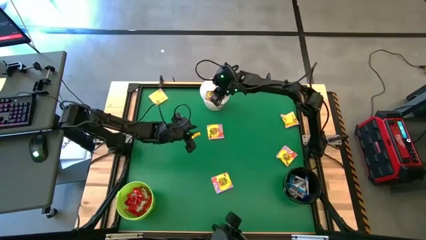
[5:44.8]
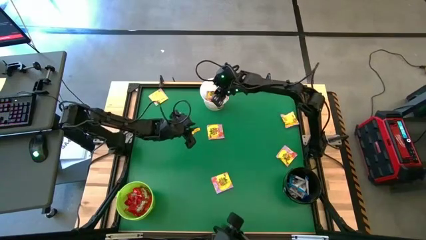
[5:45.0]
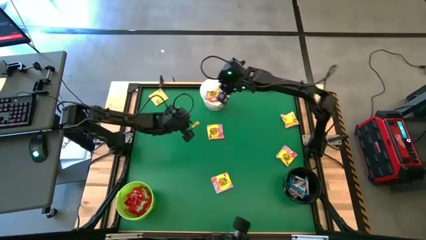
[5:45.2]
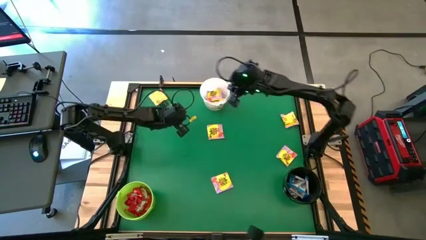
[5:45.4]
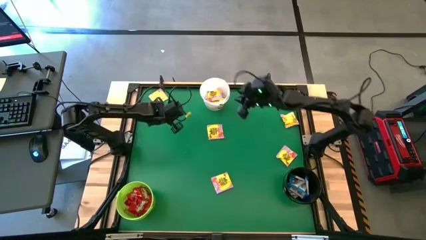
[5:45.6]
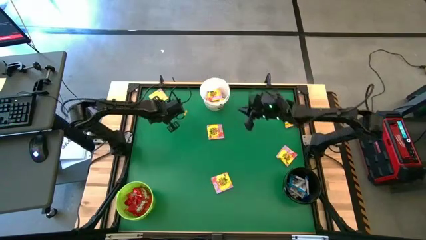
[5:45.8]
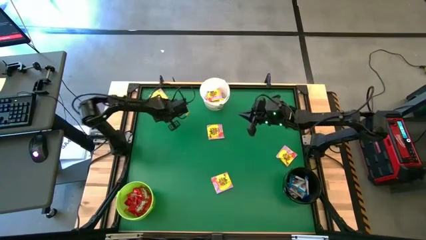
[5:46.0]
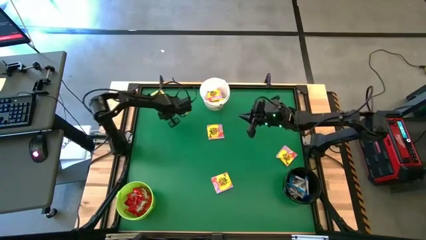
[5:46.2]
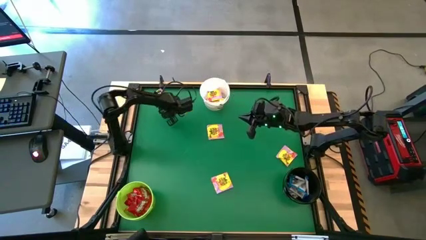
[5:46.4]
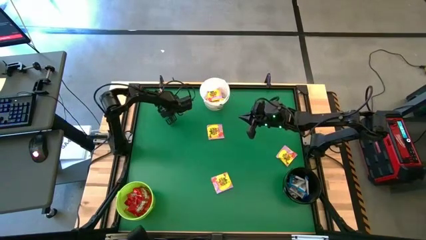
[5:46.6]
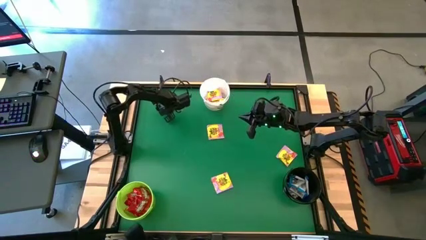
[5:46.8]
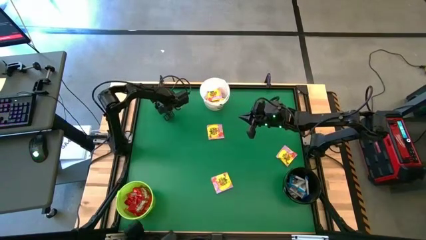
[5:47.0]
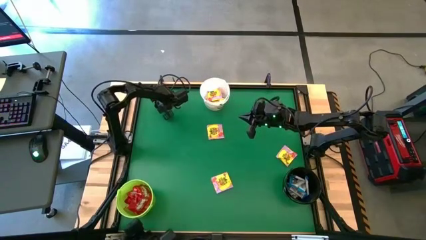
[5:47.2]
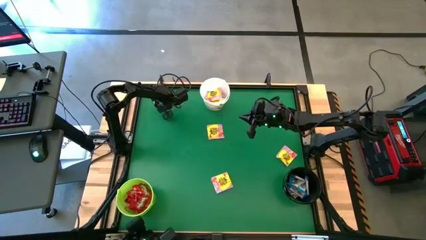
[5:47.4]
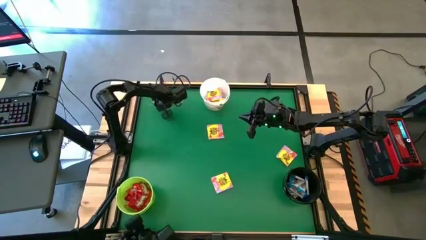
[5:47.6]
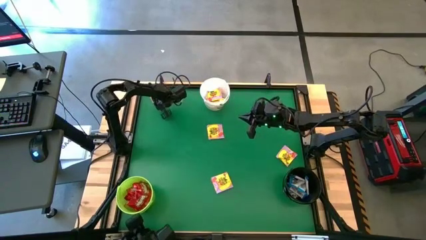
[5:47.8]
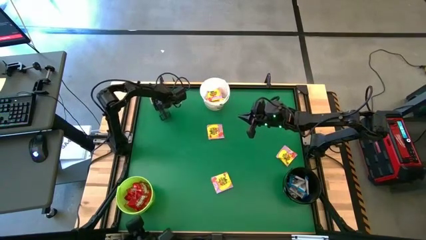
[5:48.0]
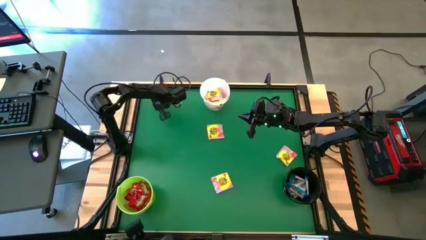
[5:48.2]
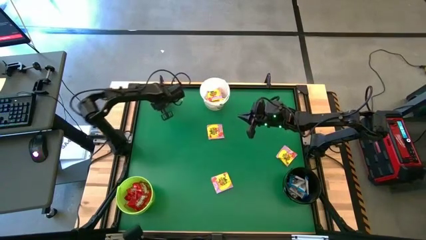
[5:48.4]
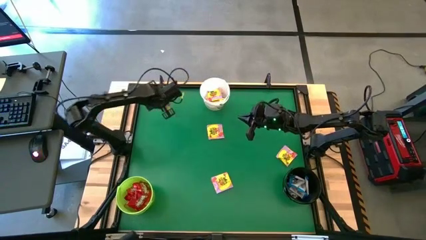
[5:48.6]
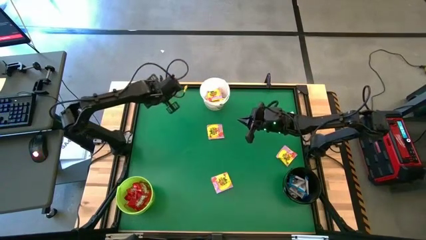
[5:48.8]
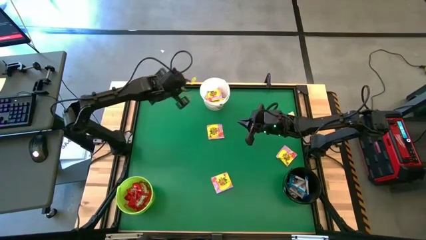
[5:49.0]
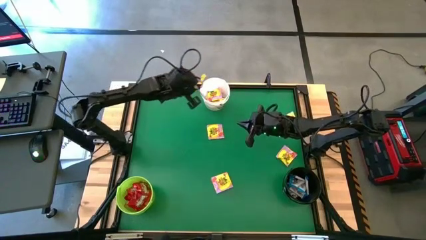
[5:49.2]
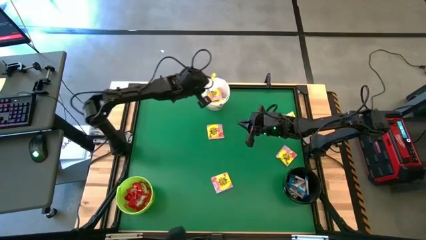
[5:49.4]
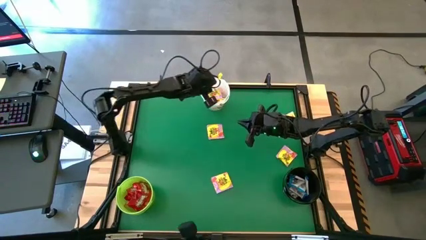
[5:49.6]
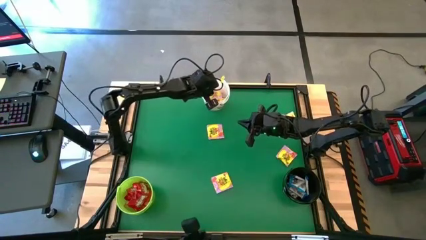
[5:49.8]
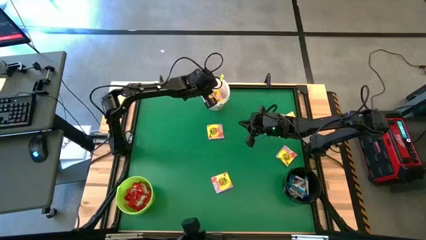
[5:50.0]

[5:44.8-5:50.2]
Task: Sort candy by brand, put in halloween buckets
Put the yellow candy into the white bucket

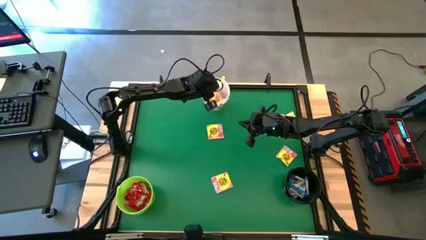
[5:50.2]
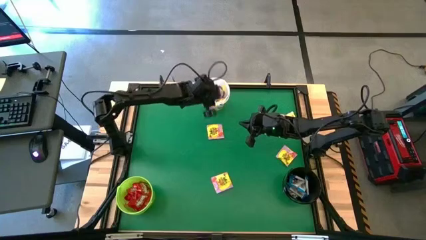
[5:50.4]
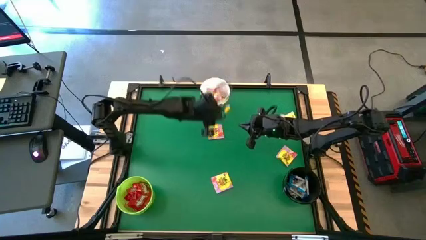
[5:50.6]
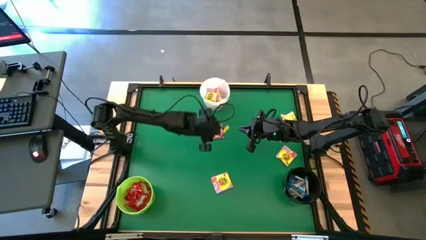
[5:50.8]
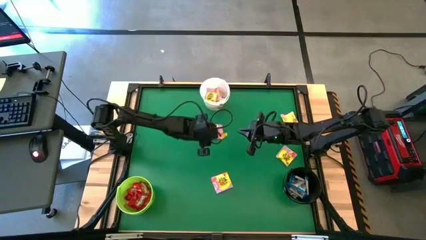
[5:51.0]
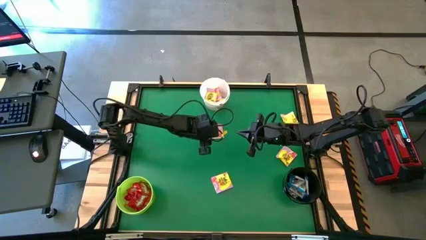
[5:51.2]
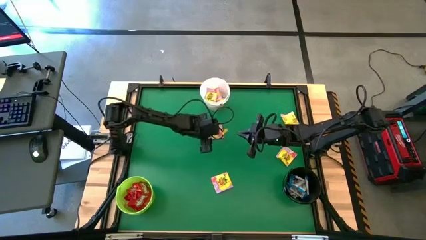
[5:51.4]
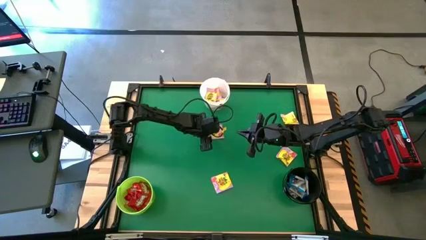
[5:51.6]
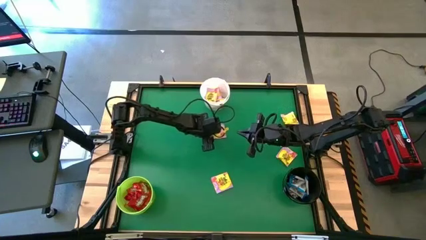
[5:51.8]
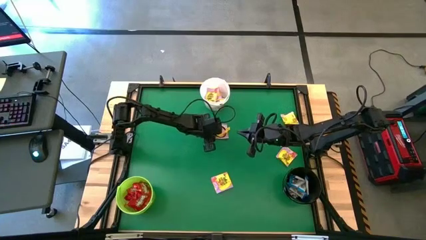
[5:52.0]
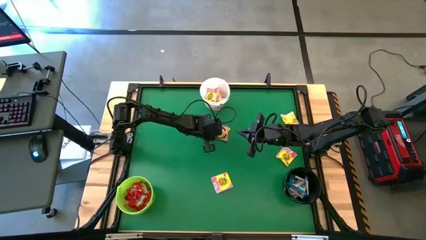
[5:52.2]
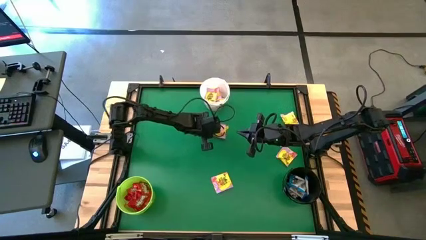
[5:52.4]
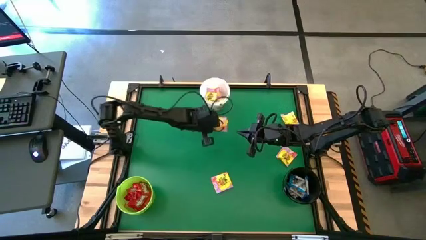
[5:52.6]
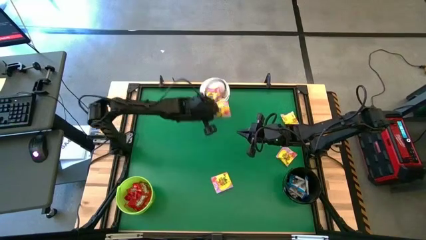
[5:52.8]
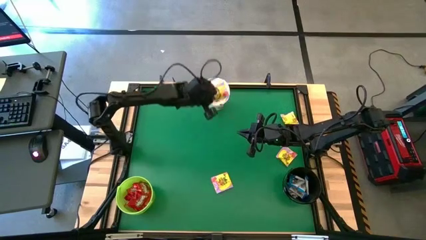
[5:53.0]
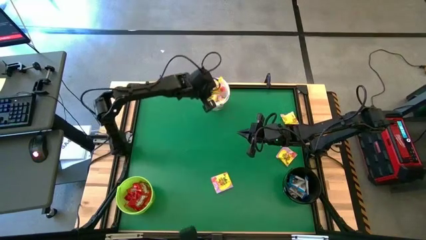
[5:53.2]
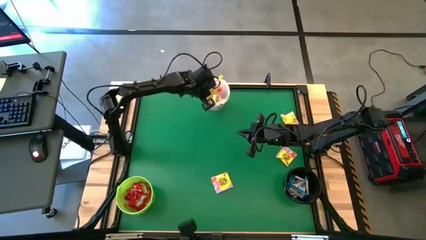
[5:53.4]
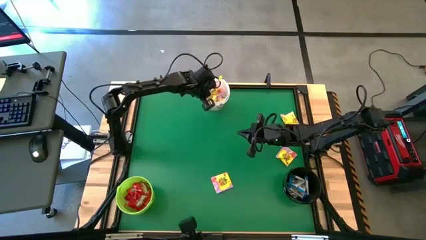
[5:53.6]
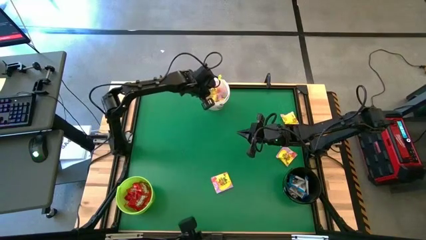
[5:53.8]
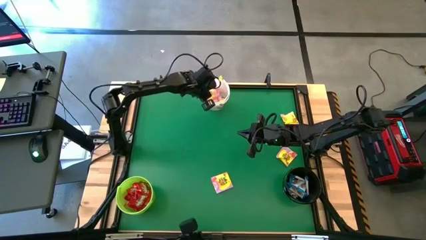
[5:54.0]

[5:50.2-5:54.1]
Put the yellow candy into the white bucket

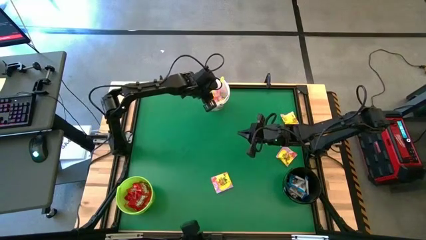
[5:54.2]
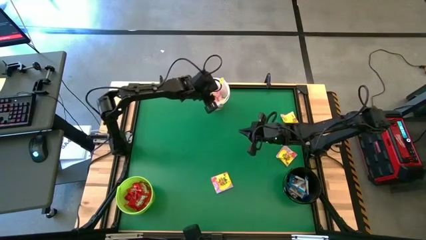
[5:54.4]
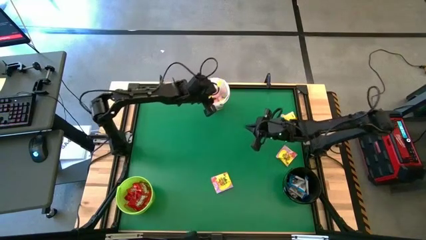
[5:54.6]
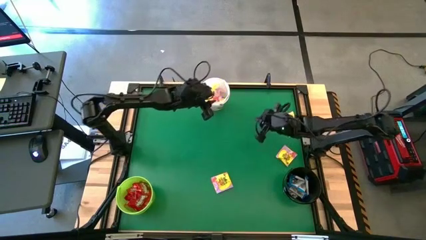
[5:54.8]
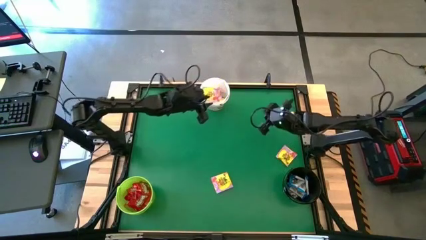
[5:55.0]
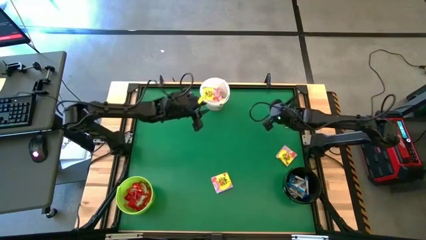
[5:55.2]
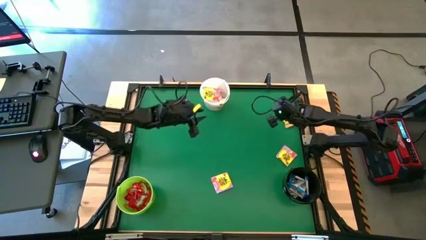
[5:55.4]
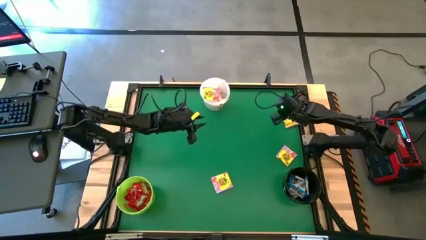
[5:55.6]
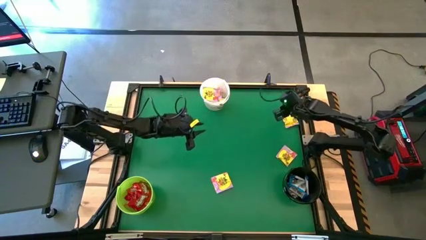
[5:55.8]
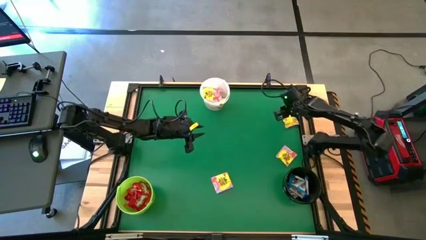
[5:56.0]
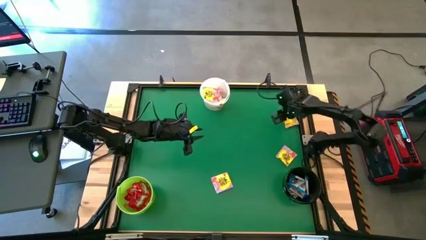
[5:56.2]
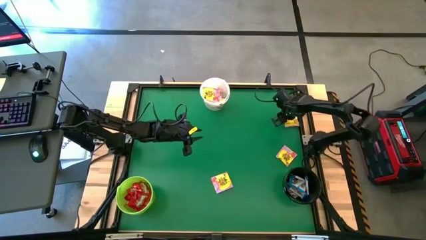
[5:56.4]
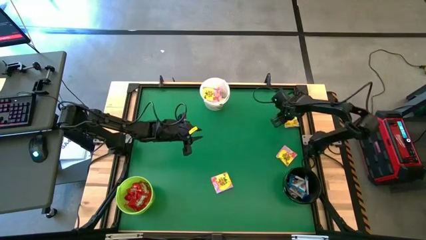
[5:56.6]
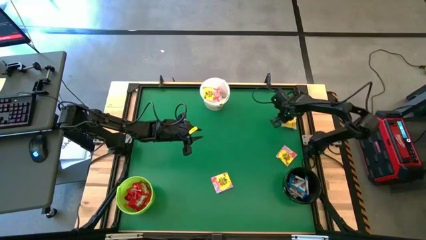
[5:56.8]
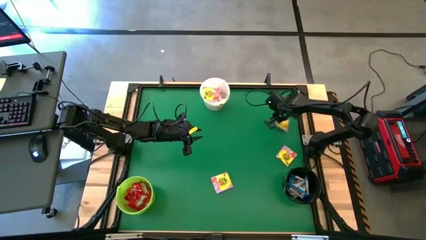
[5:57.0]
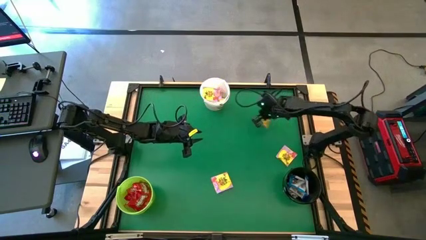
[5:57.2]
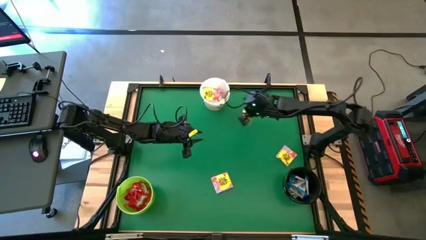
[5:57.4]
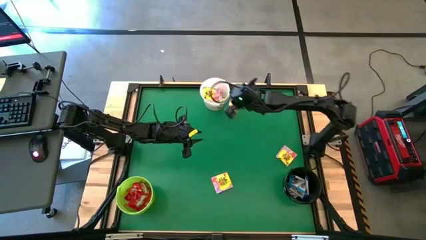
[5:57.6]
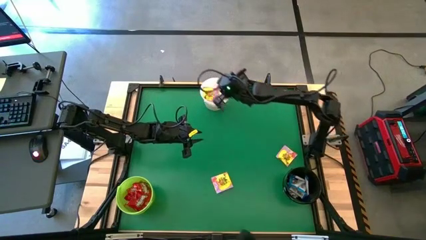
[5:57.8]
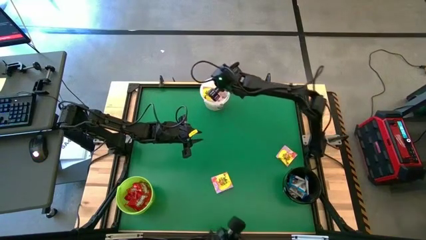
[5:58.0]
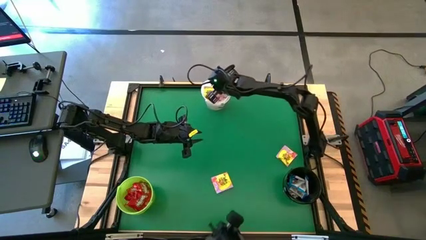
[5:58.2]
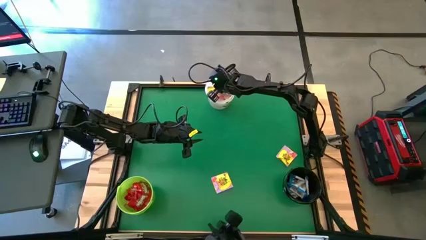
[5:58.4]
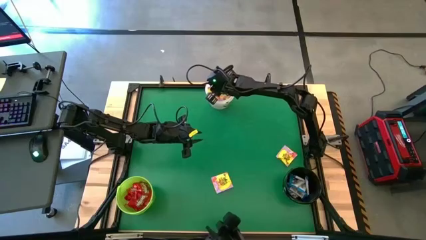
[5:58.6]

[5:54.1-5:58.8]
Put the yellow candy into the white bucket

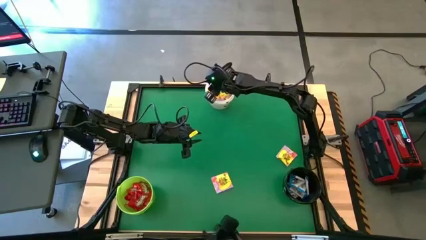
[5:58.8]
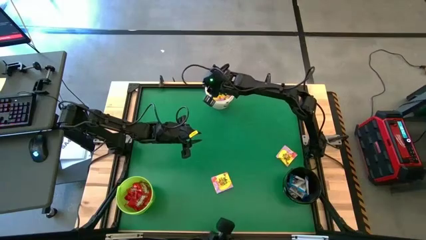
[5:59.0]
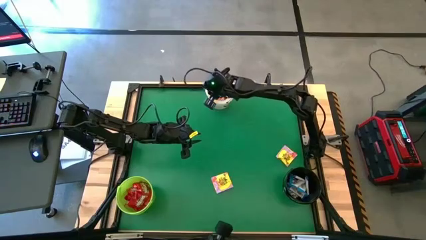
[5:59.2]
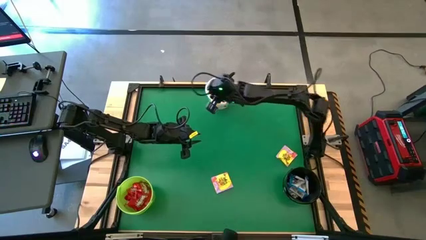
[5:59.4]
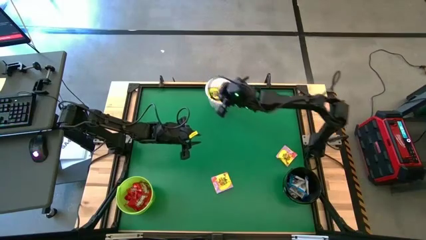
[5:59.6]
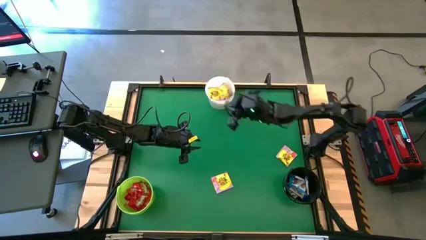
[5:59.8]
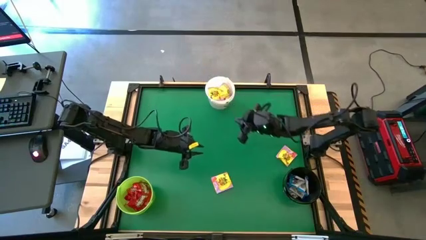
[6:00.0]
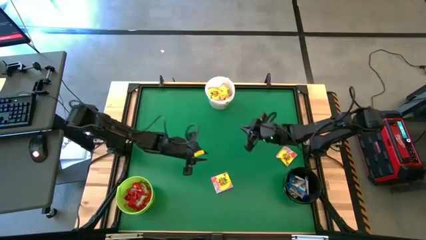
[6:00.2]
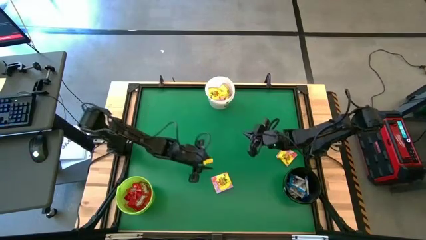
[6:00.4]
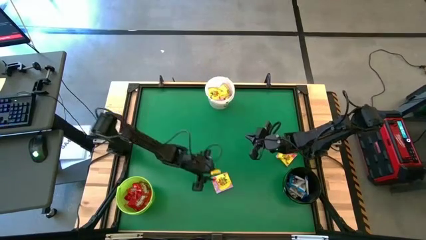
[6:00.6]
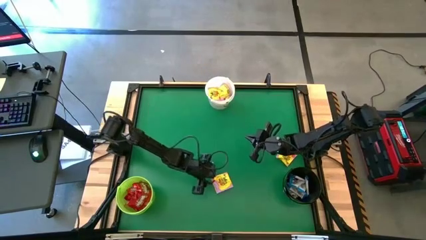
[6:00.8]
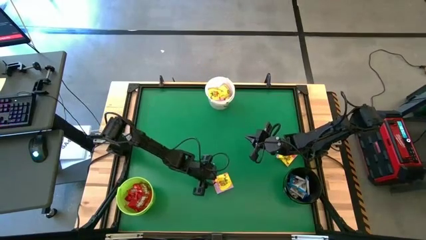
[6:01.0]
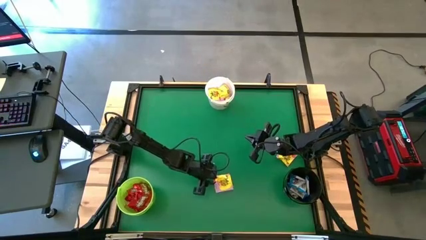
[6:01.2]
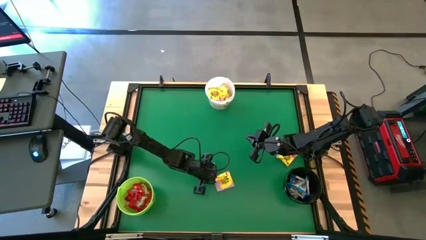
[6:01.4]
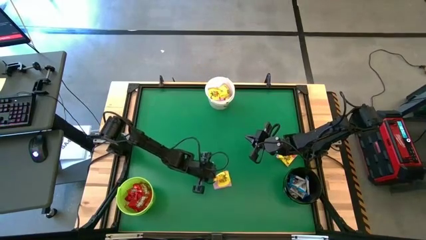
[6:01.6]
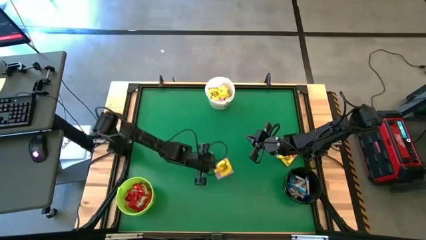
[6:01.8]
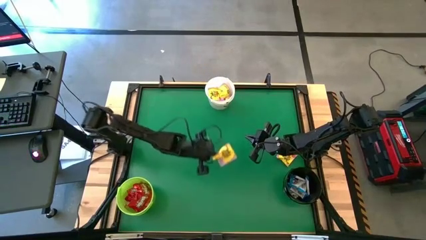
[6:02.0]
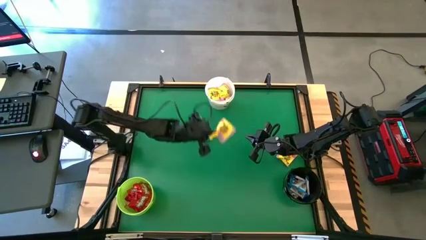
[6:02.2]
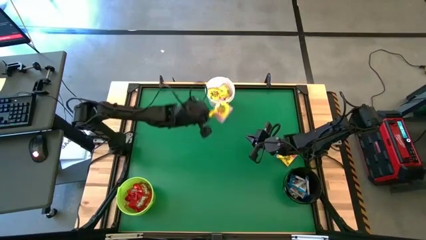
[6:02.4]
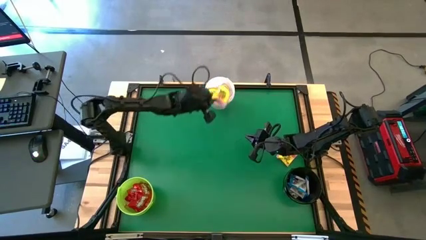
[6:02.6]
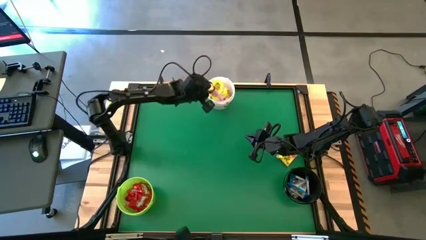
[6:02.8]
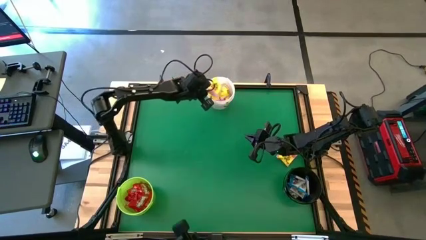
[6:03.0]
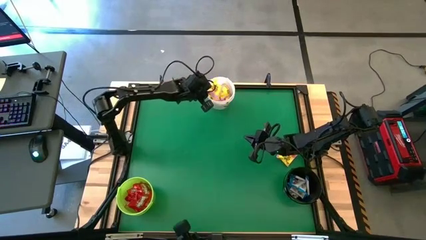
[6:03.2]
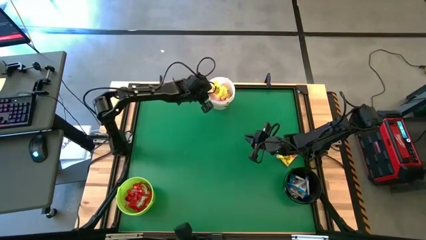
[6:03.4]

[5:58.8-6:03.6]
Put the yellow candy into the white bucket
